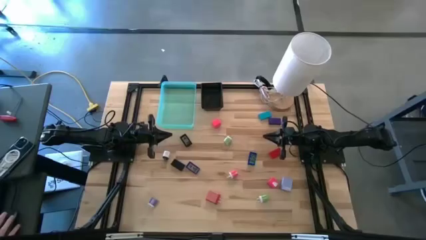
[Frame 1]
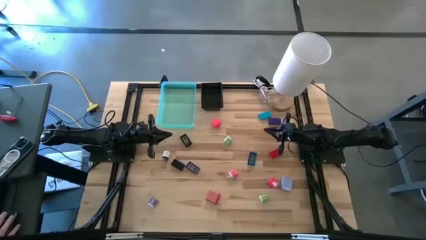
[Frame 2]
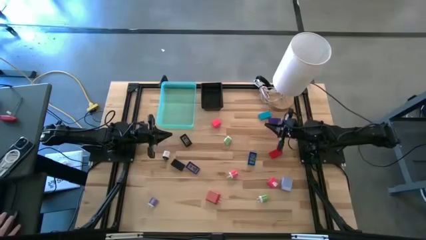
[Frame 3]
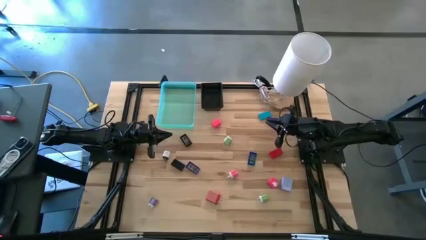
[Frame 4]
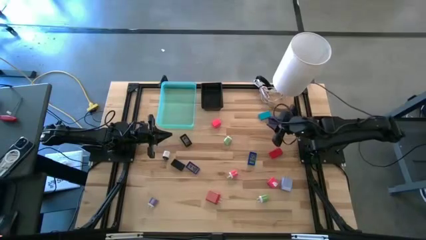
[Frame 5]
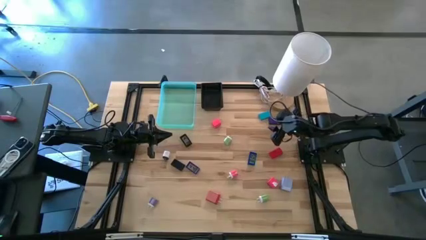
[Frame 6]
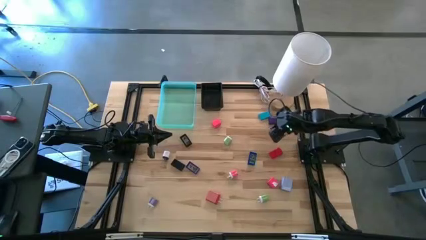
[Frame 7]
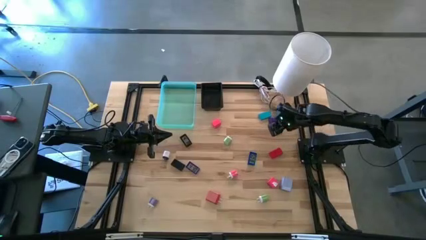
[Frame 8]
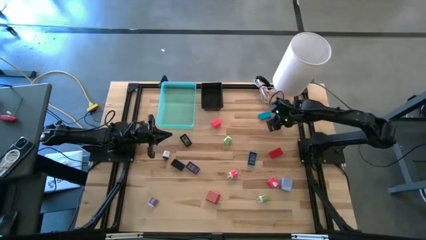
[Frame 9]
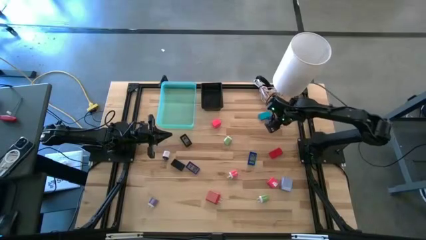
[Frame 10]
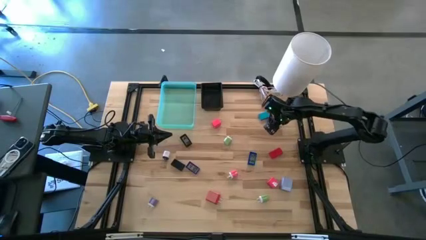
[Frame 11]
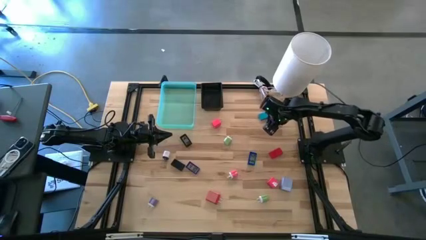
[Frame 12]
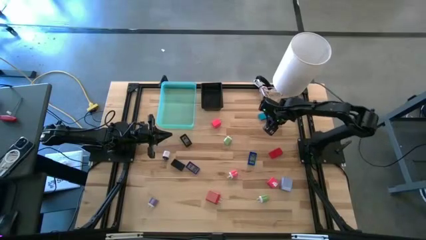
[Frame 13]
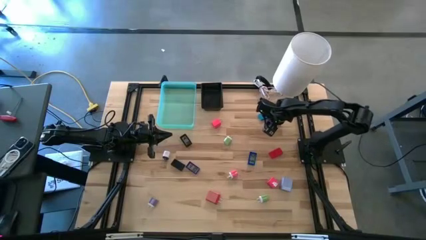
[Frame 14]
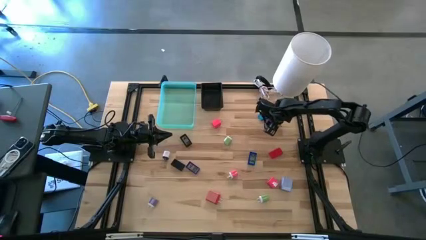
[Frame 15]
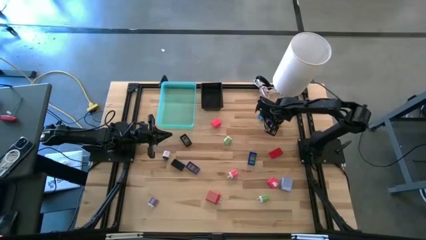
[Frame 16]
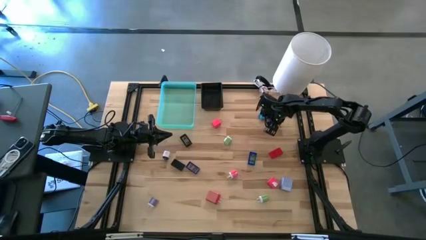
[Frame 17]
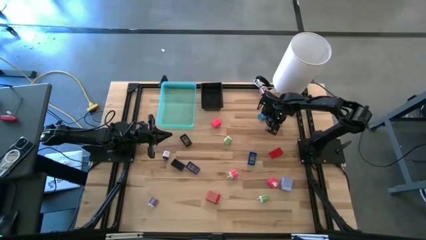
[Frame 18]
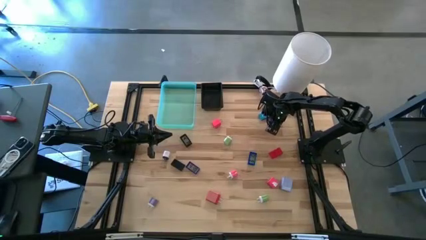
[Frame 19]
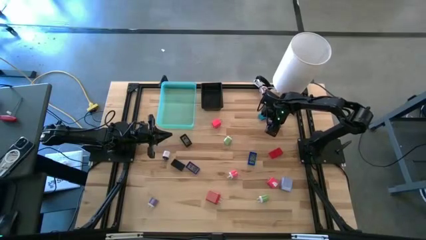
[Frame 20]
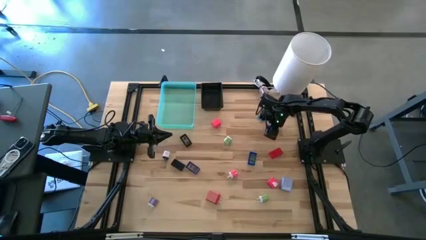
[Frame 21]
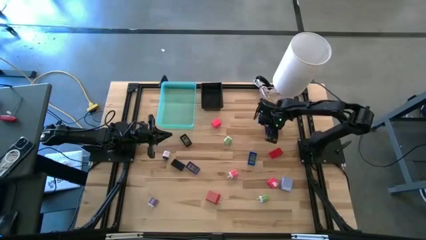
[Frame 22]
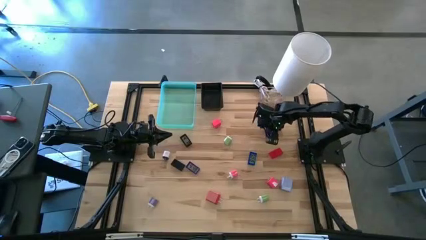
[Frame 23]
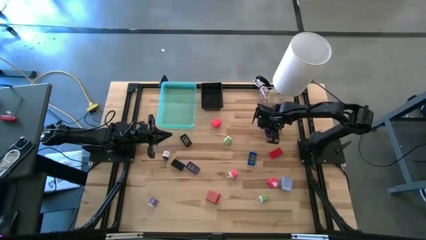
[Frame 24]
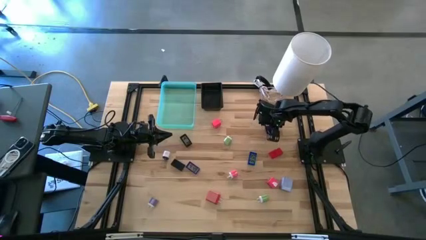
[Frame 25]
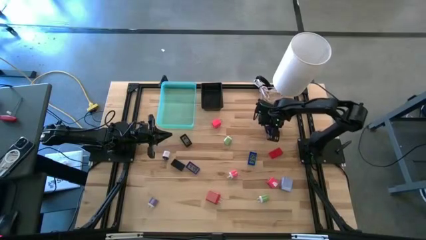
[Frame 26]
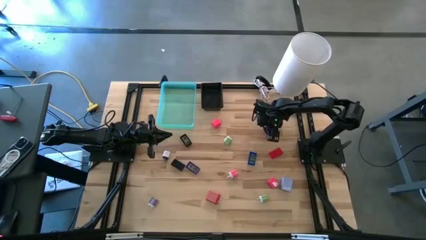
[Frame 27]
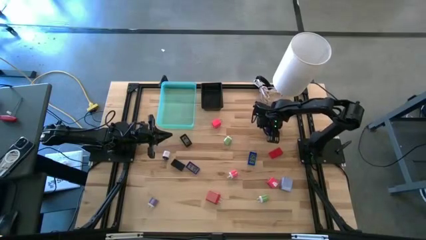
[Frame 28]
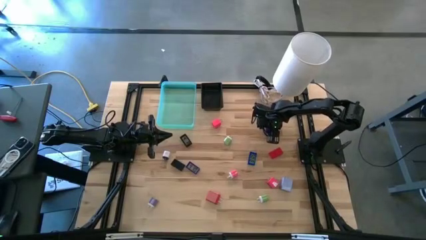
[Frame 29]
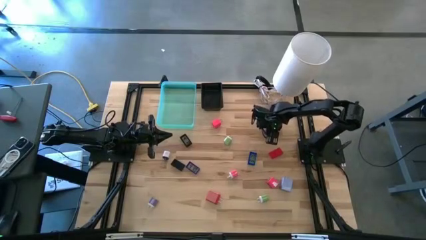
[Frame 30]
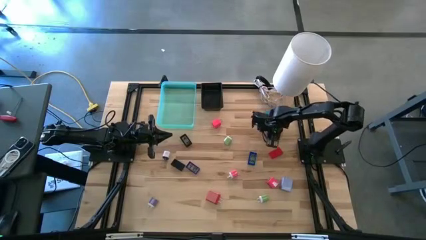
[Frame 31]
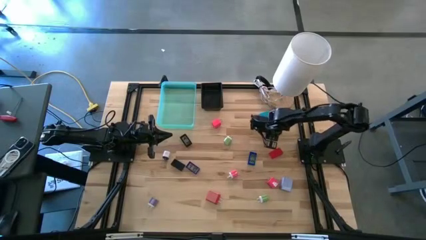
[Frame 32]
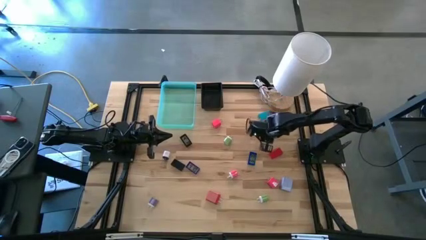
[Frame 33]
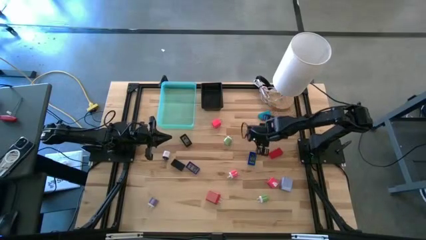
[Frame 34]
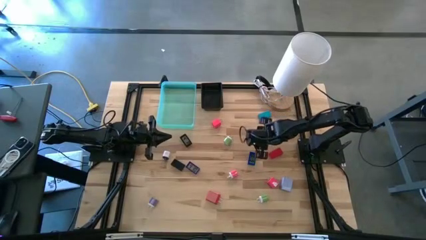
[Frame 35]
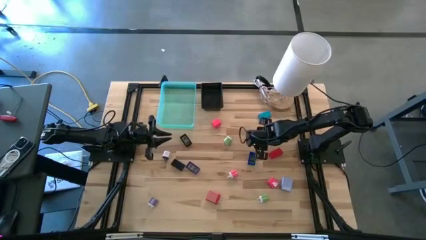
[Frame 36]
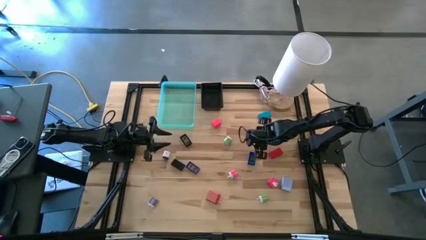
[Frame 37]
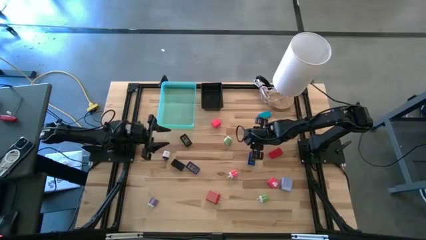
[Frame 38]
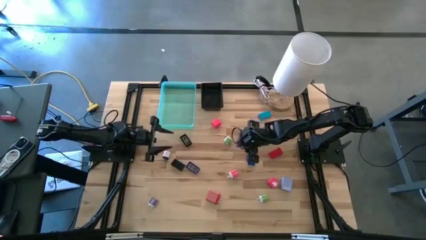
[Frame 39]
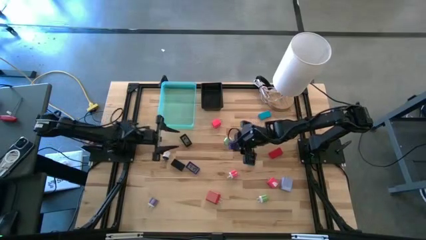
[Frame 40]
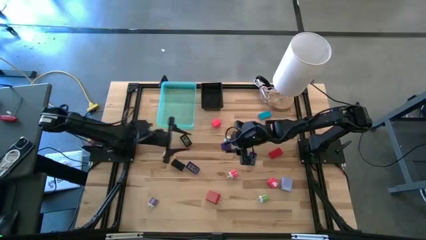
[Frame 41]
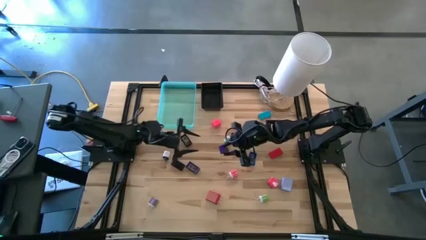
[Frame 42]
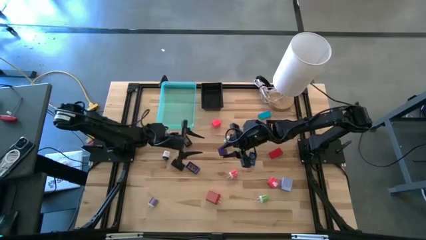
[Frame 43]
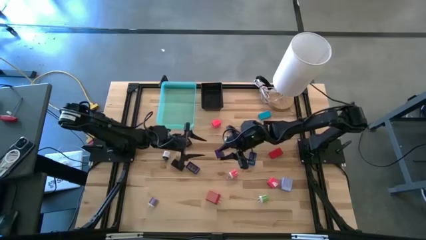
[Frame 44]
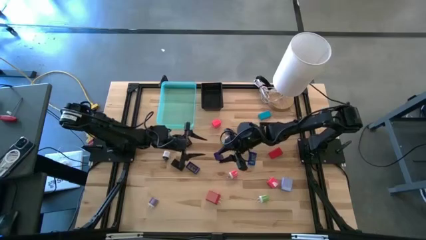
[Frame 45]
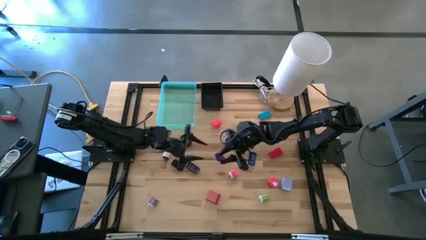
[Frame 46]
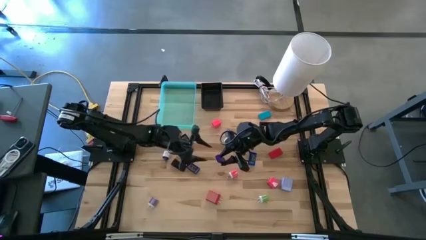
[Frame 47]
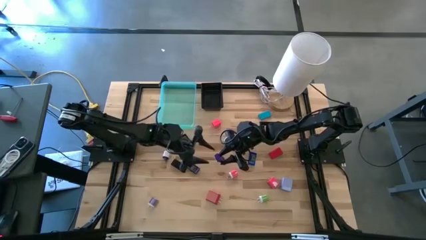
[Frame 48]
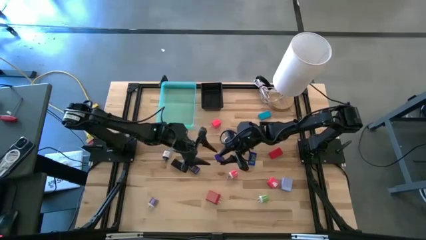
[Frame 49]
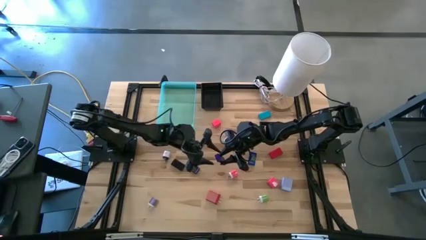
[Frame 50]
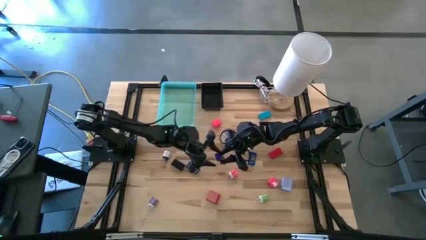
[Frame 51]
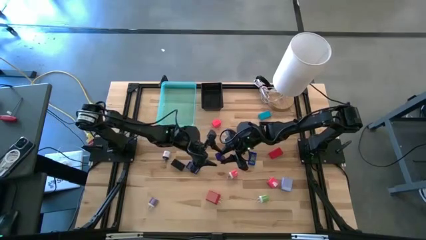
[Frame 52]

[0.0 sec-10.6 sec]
Task: Pick & Place Office items
Put the top right blue timer into the black bin
